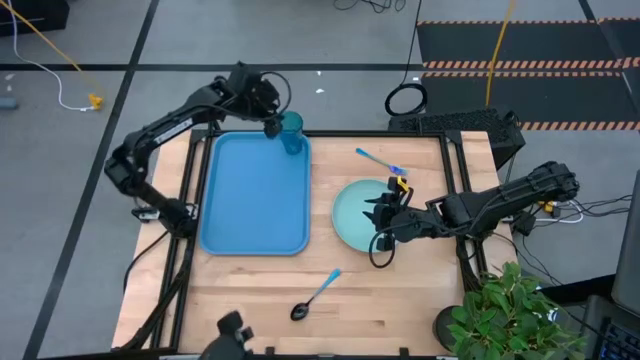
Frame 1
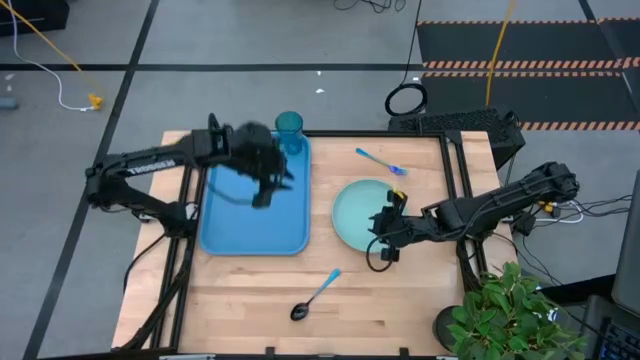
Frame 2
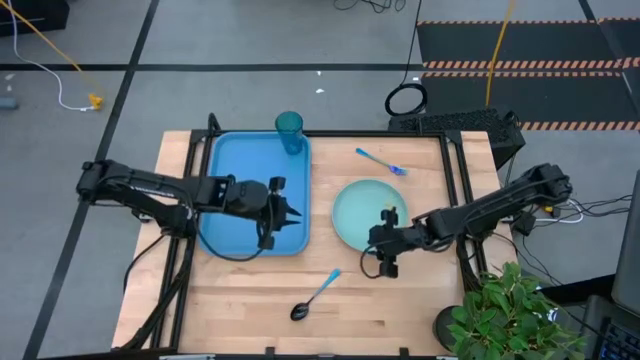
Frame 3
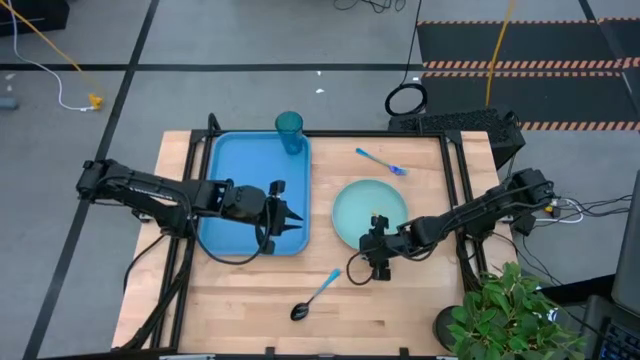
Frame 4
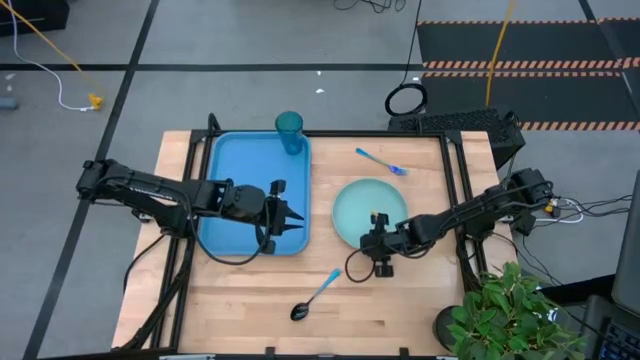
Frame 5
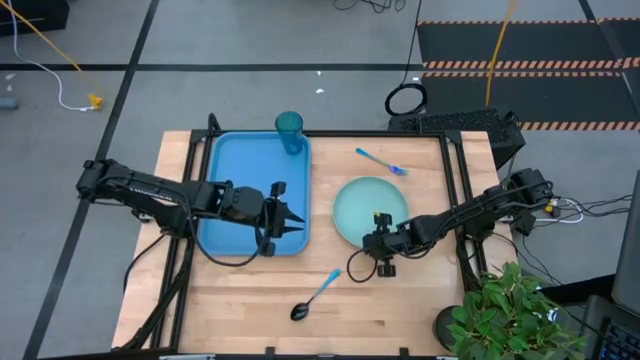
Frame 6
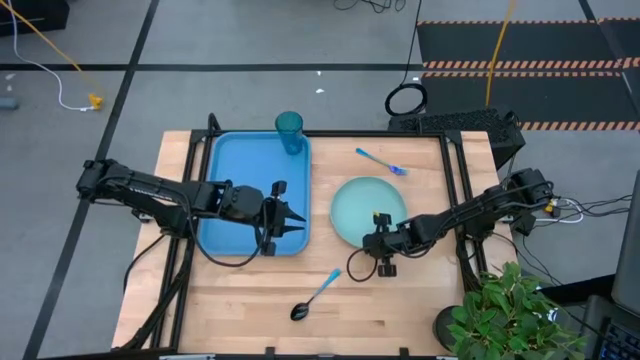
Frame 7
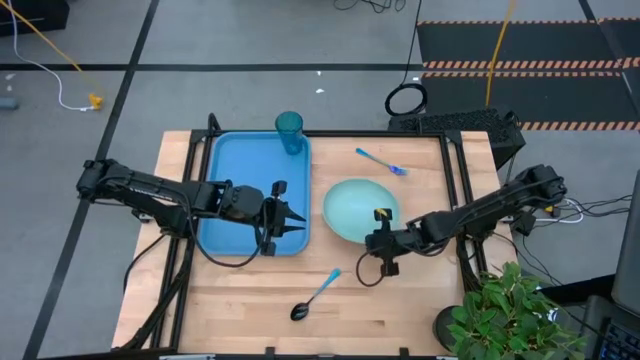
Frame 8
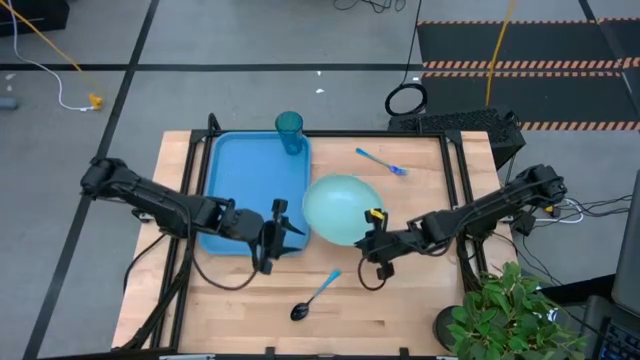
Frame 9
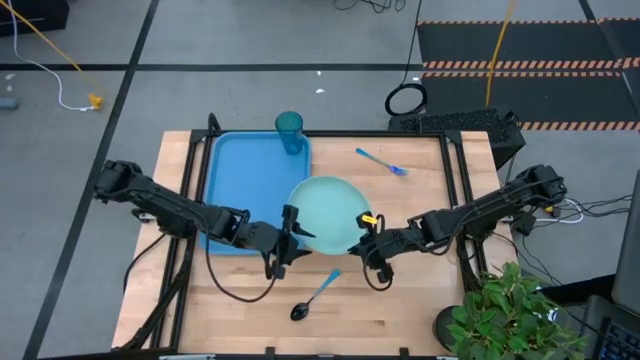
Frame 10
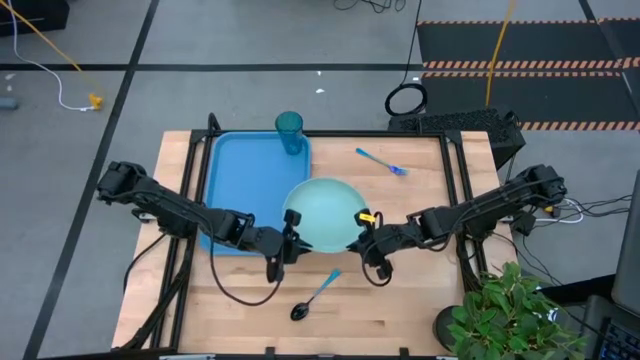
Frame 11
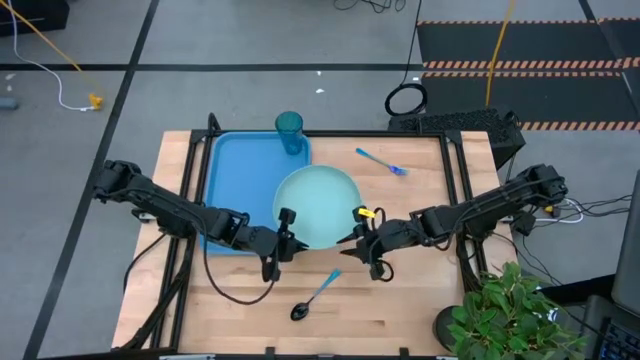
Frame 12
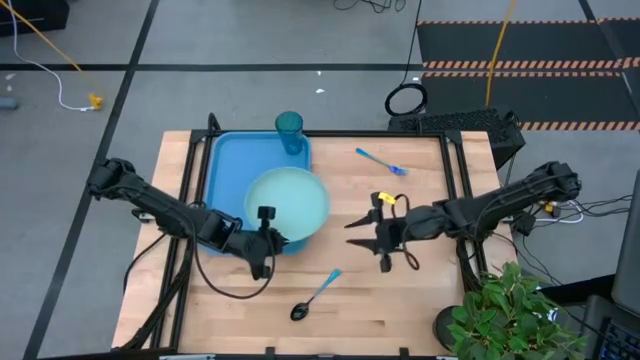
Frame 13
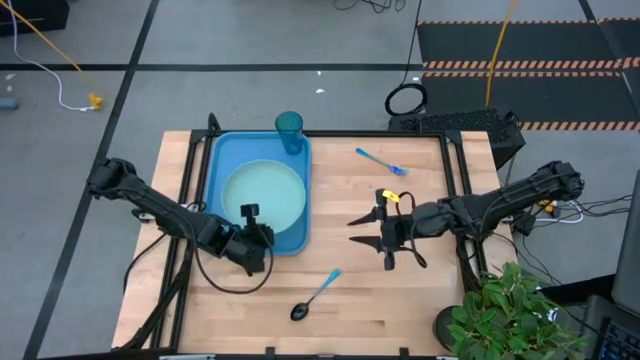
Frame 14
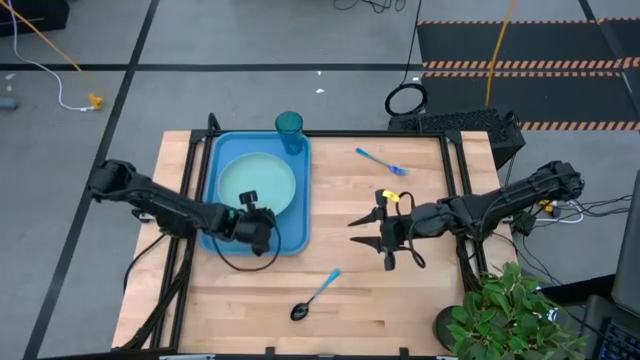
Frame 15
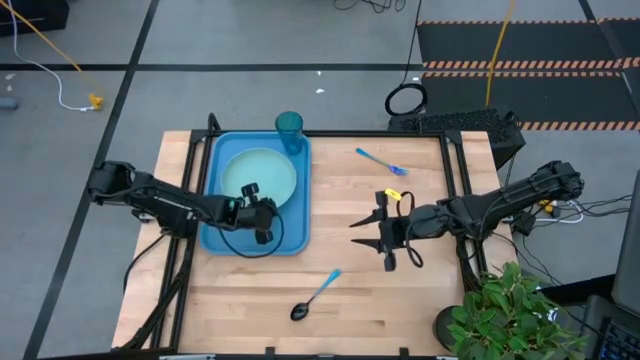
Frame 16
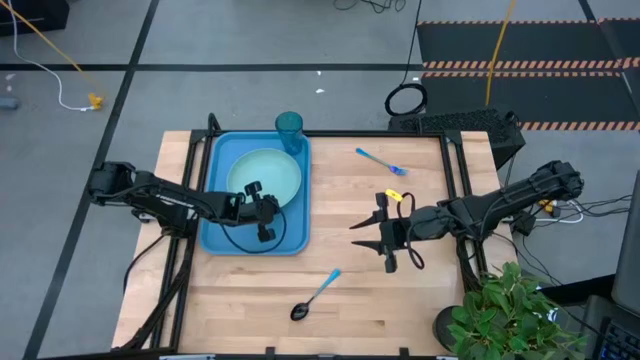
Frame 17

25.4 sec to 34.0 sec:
Task: Pick and place plate/cup/fork/spoon on tray
Put the green plate on the blue tray

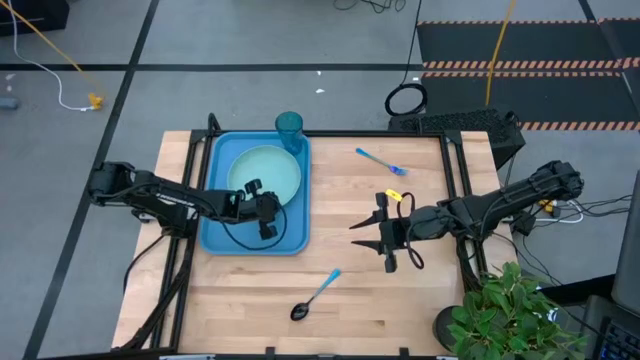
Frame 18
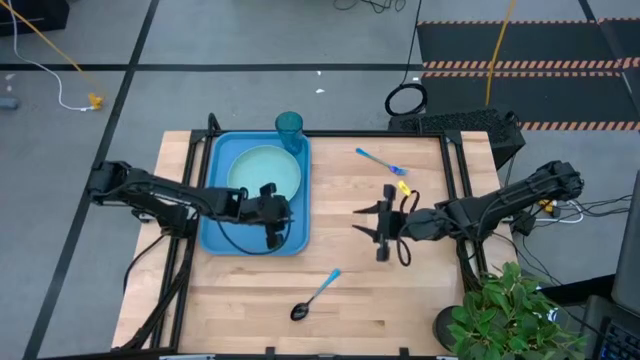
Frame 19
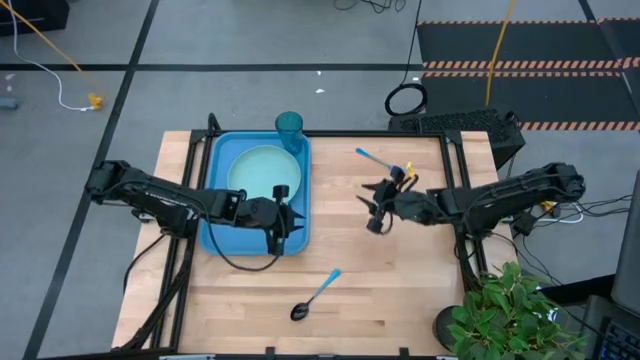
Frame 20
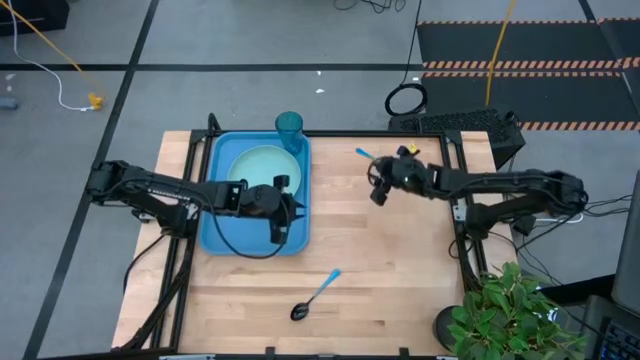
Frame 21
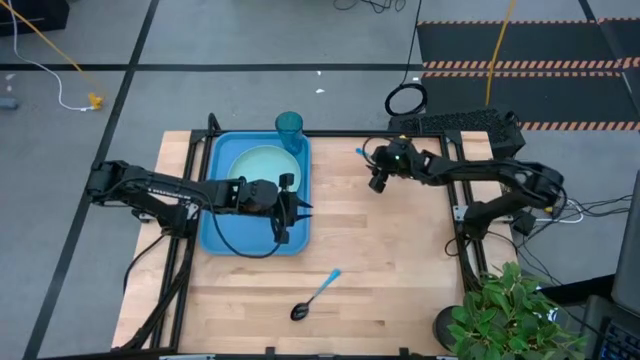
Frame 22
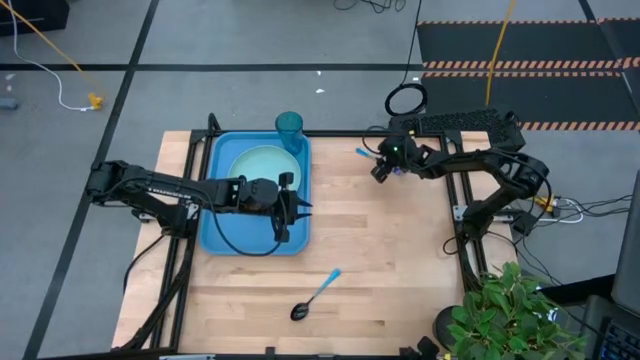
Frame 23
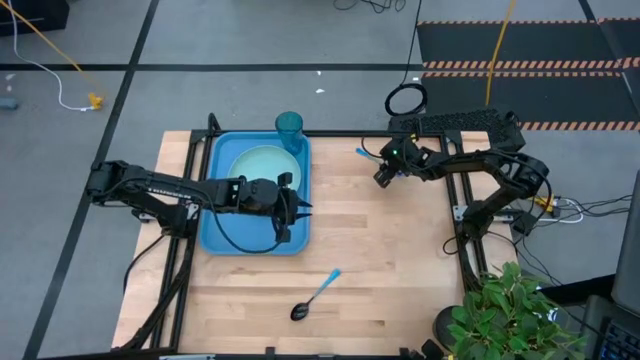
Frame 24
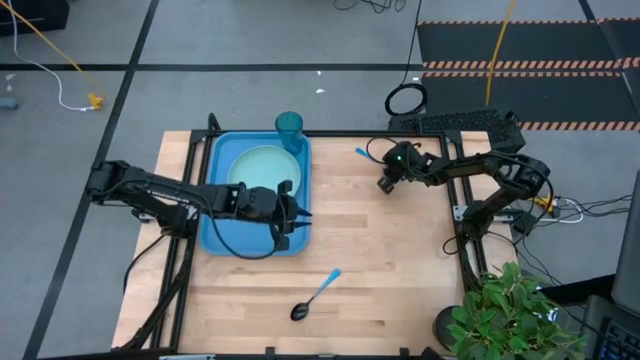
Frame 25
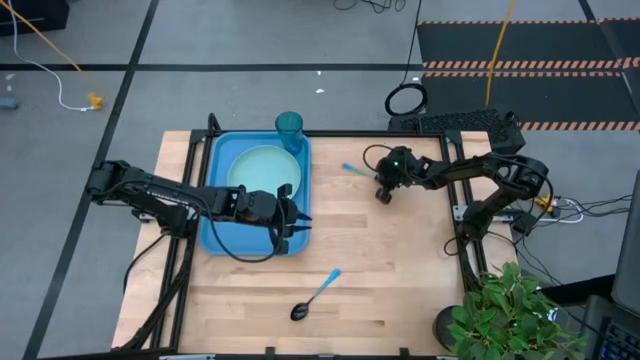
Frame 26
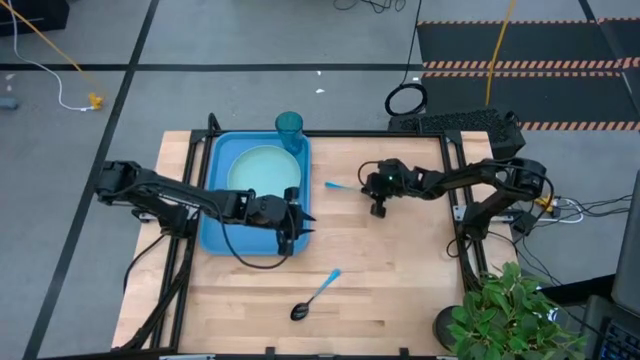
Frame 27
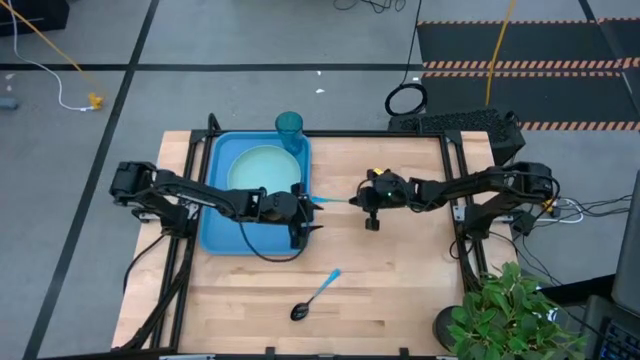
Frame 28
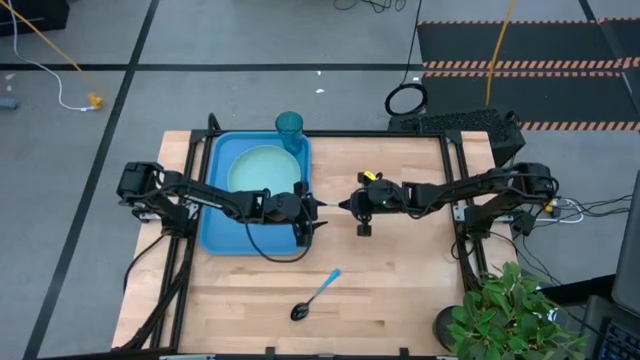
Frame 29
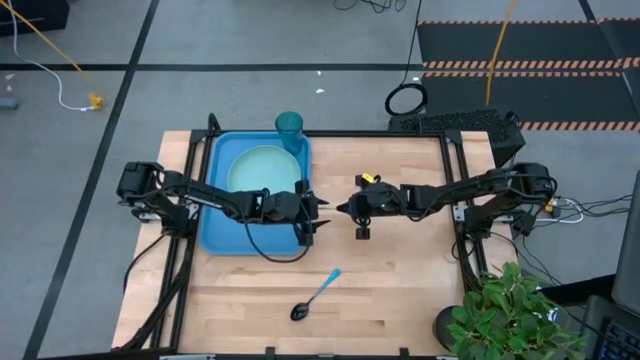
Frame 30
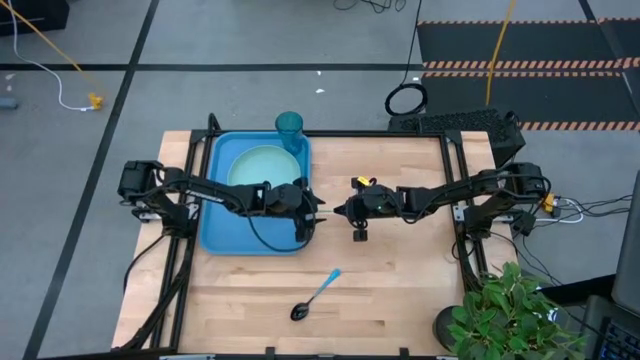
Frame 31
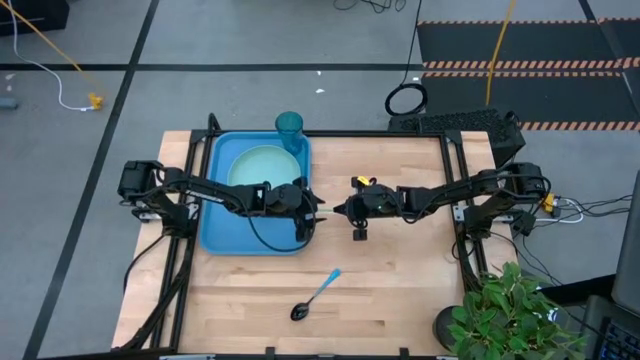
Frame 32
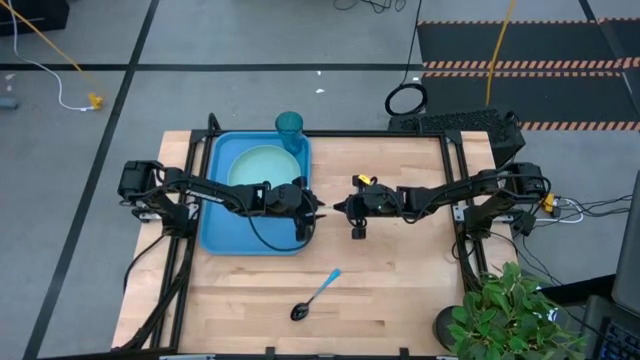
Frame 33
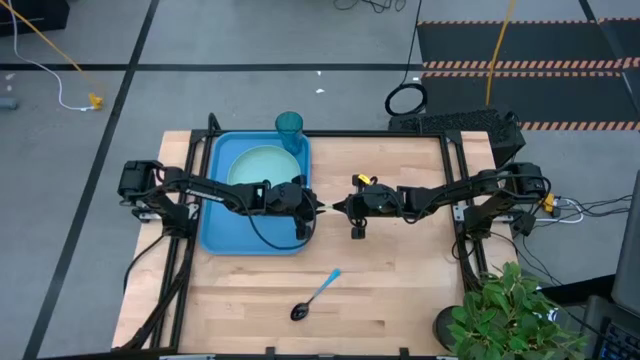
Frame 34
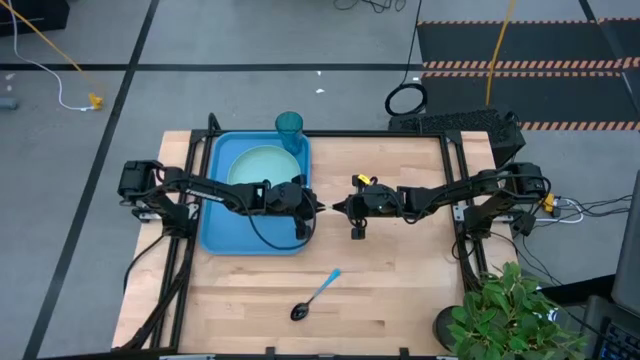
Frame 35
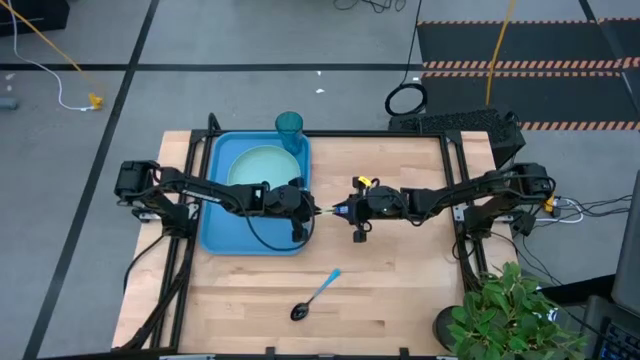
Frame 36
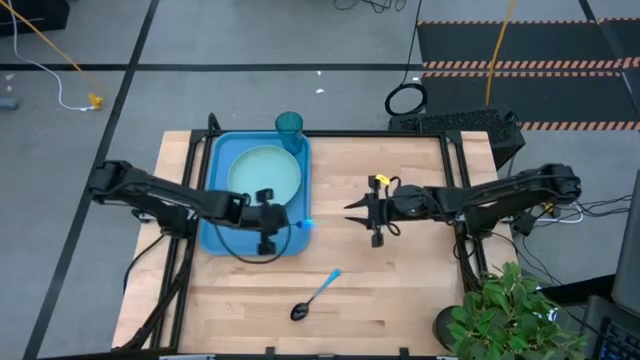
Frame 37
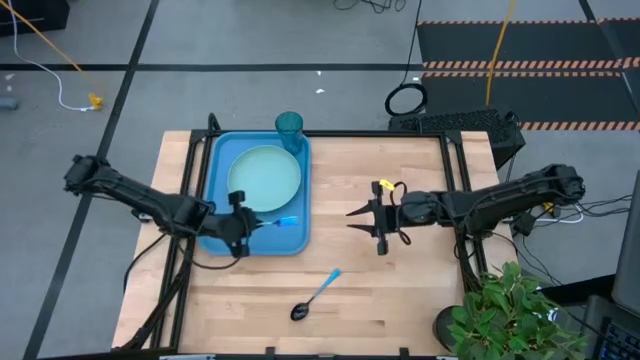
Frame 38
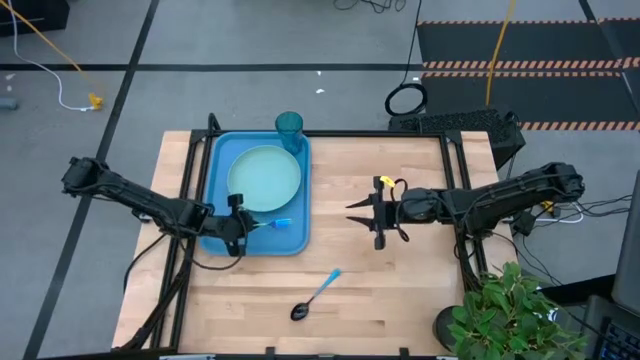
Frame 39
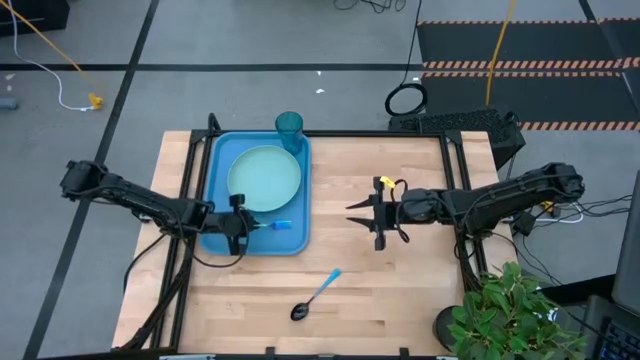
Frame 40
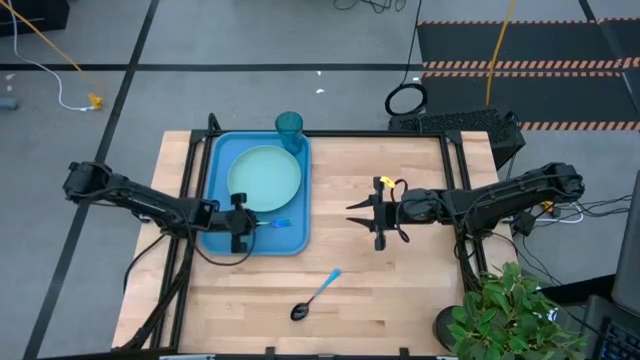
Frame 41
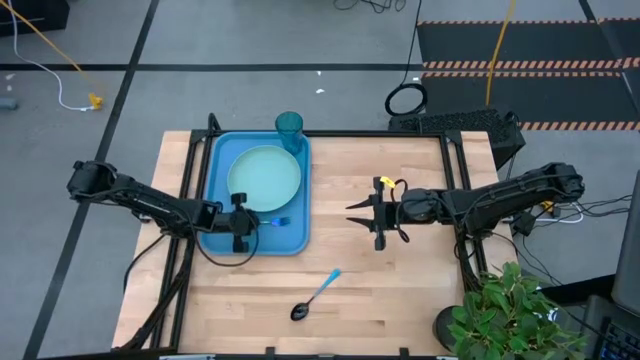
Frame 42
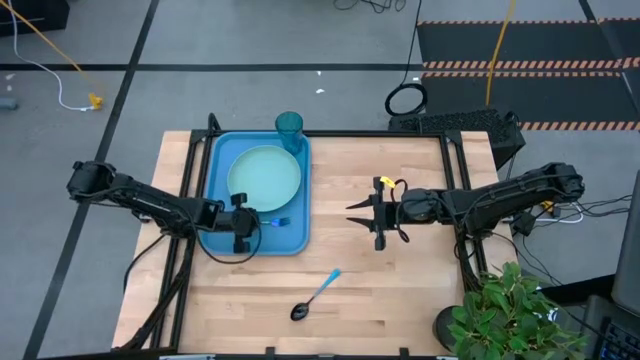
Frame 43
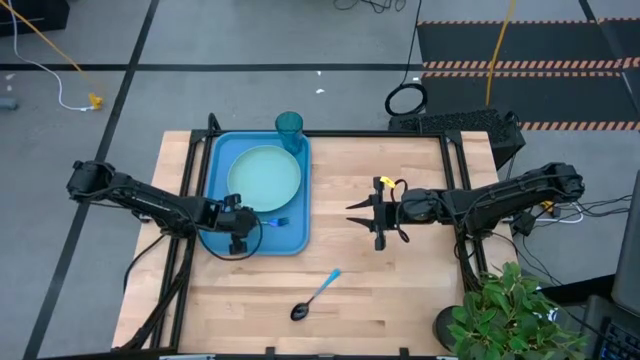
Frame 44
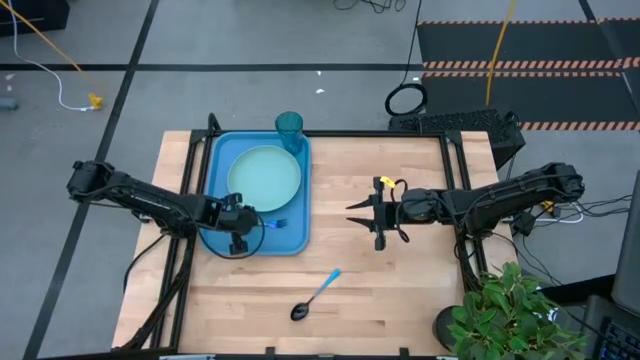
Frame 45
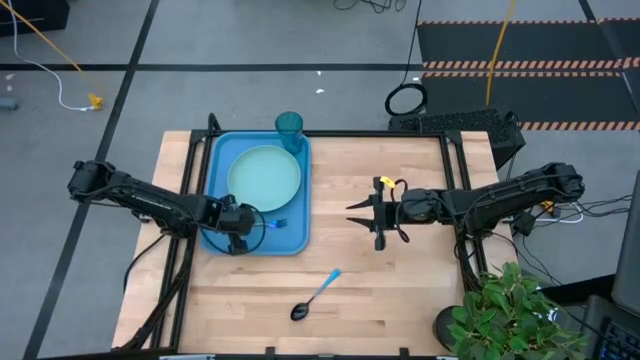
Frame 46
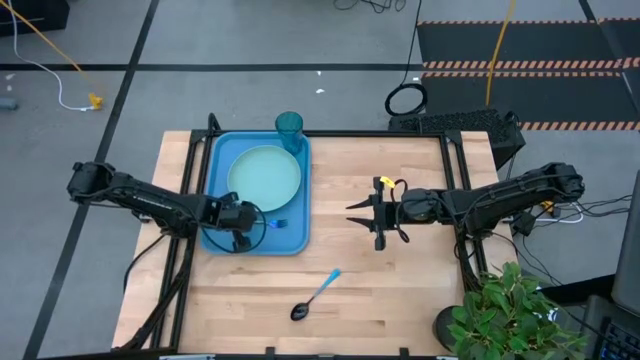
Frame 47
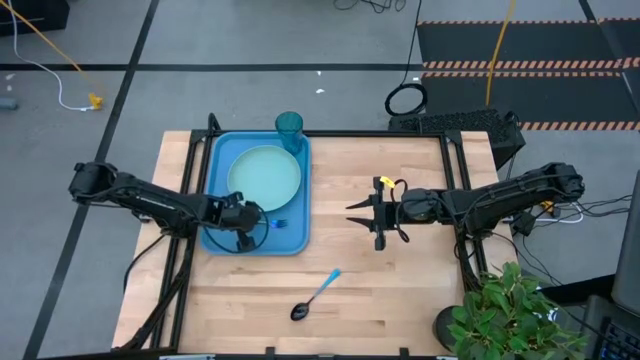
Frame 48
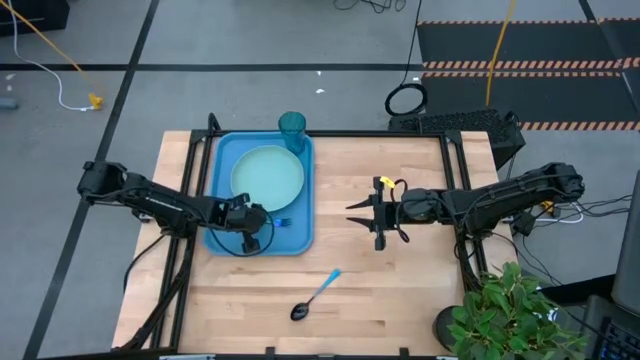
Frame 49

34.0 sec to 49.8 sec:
Put the blue fork on the blue tray to the bottom of the green plate
